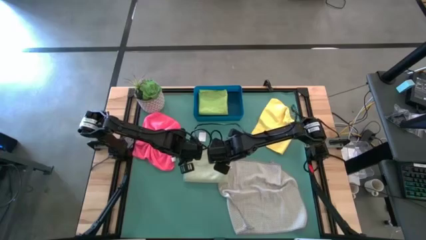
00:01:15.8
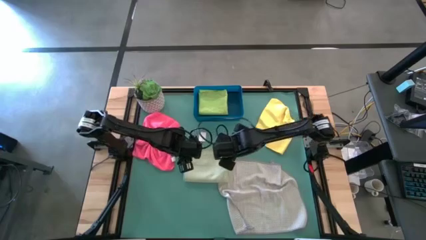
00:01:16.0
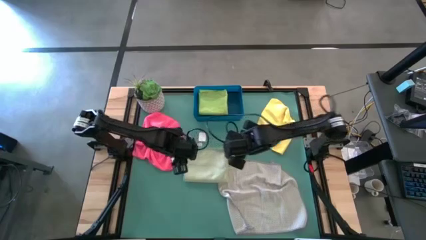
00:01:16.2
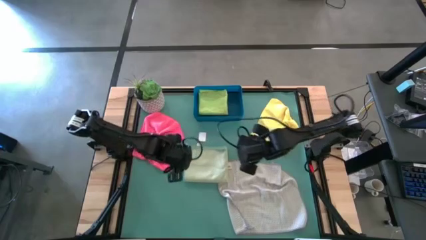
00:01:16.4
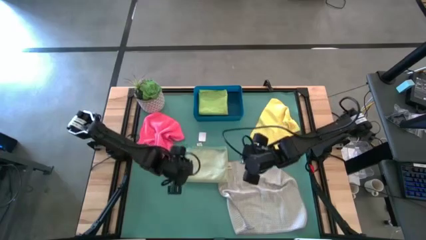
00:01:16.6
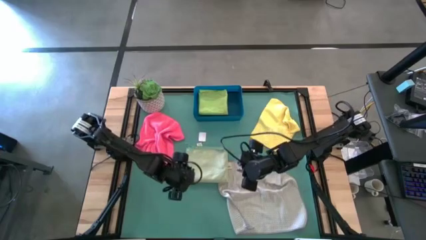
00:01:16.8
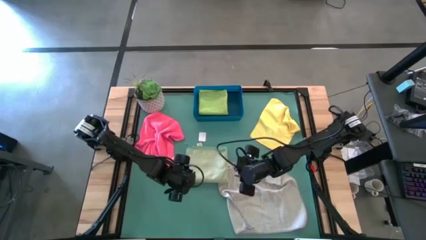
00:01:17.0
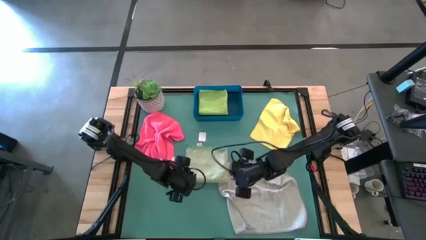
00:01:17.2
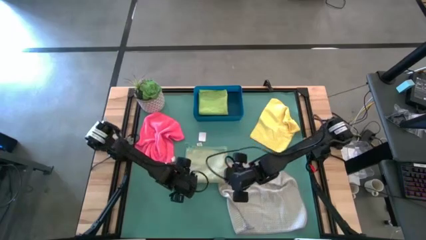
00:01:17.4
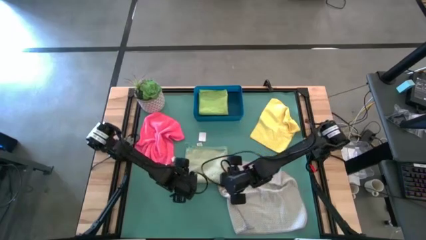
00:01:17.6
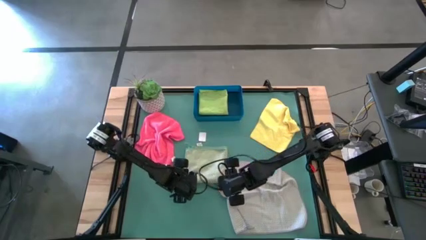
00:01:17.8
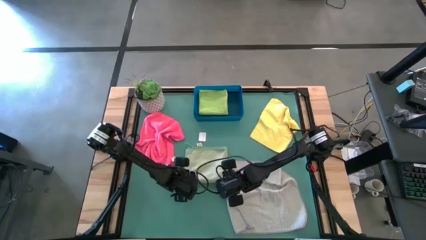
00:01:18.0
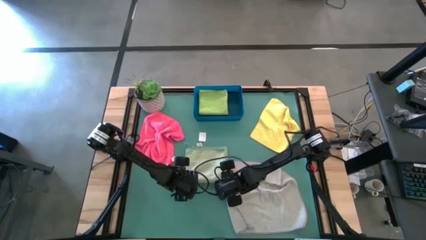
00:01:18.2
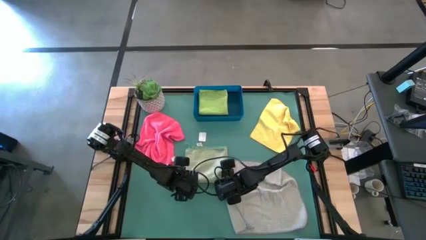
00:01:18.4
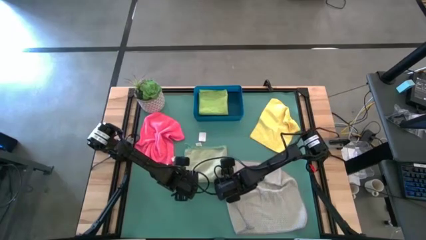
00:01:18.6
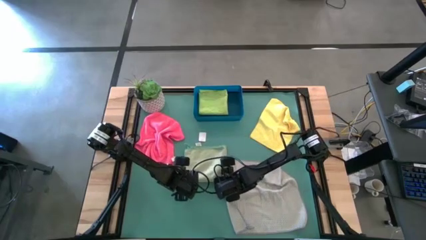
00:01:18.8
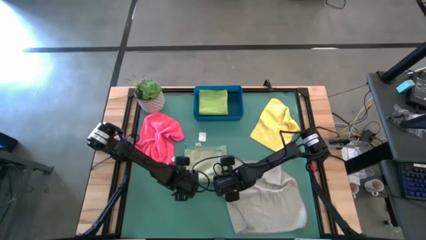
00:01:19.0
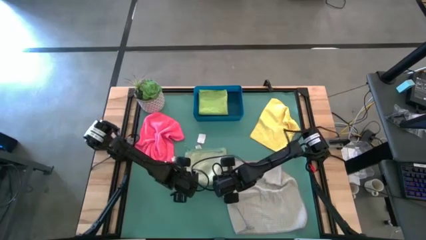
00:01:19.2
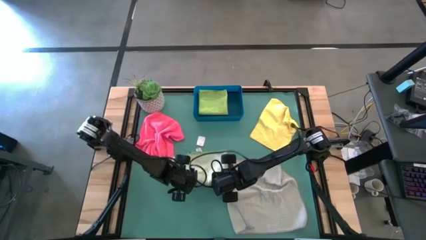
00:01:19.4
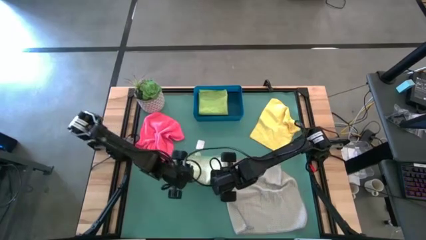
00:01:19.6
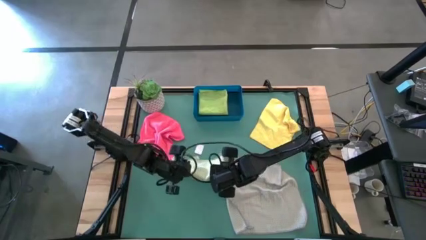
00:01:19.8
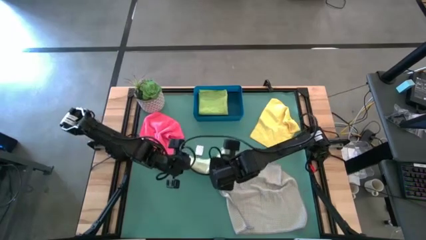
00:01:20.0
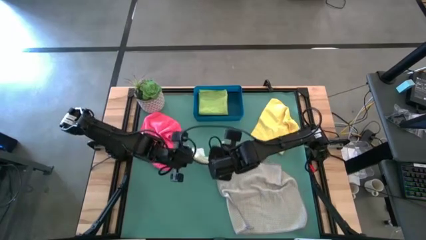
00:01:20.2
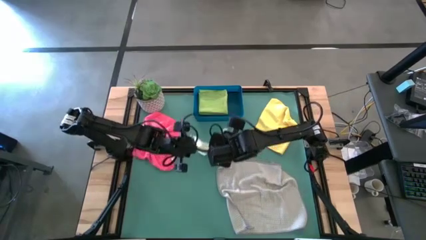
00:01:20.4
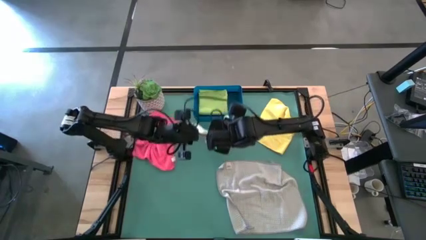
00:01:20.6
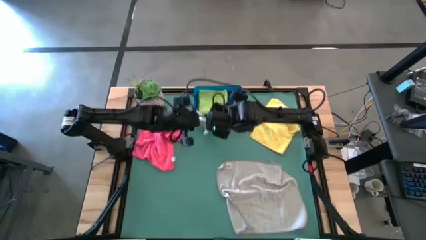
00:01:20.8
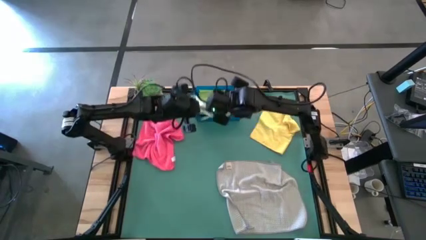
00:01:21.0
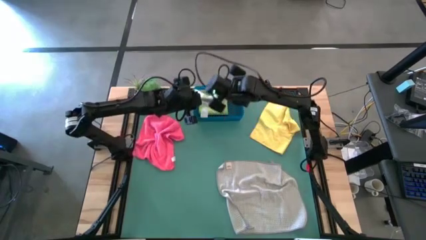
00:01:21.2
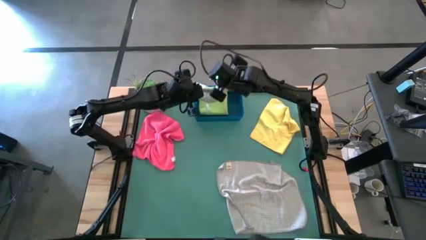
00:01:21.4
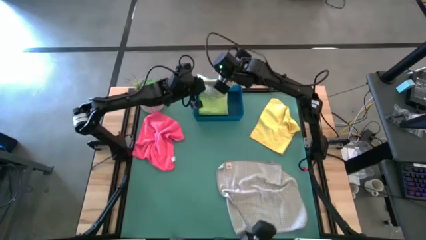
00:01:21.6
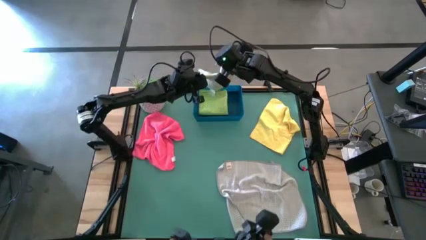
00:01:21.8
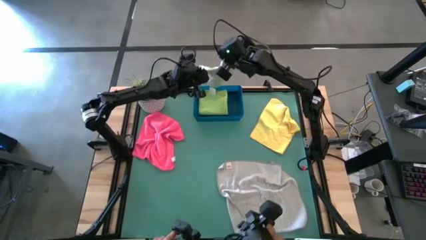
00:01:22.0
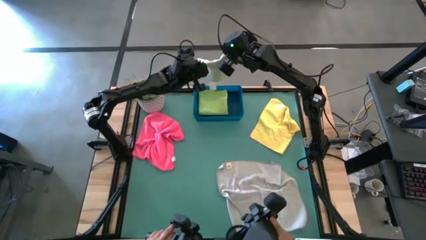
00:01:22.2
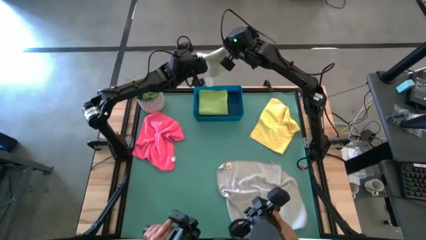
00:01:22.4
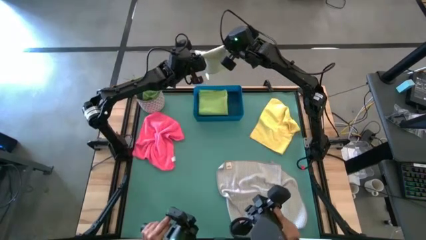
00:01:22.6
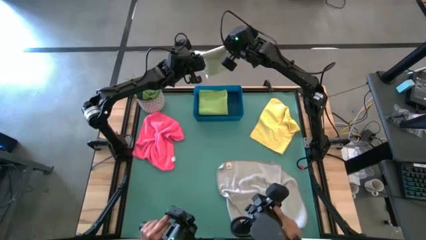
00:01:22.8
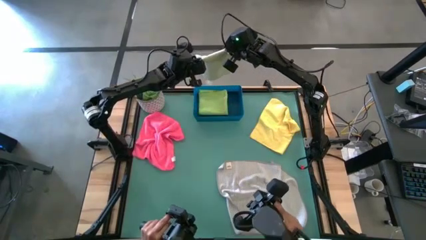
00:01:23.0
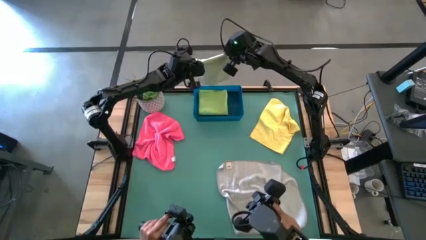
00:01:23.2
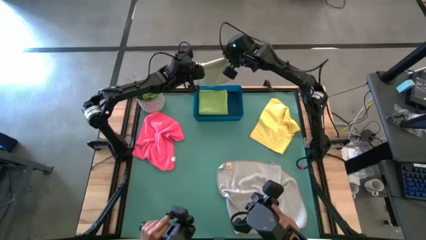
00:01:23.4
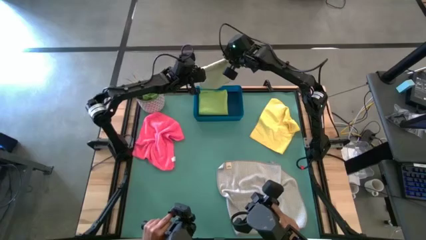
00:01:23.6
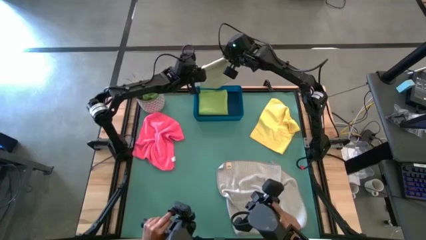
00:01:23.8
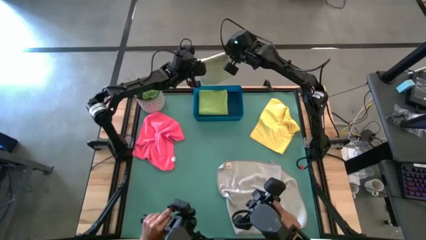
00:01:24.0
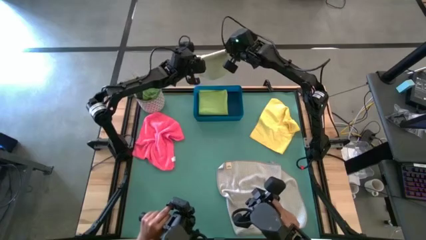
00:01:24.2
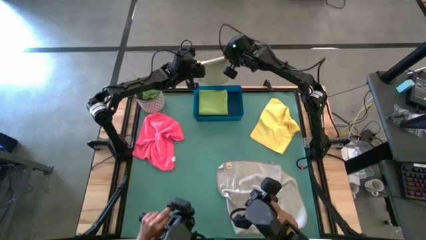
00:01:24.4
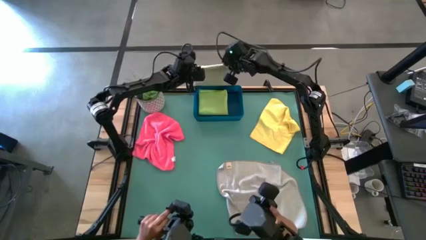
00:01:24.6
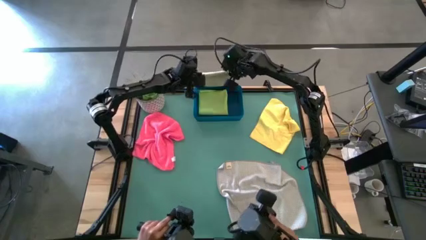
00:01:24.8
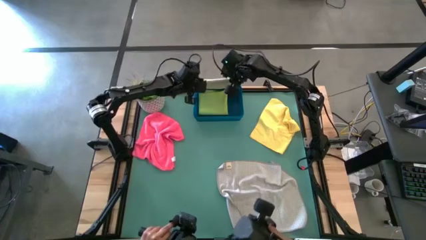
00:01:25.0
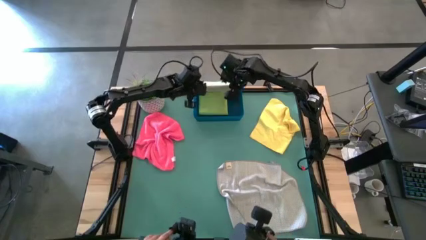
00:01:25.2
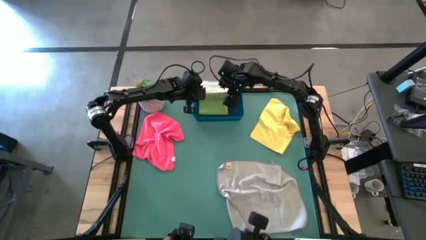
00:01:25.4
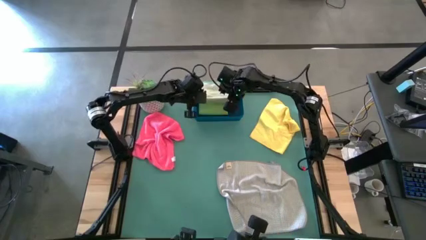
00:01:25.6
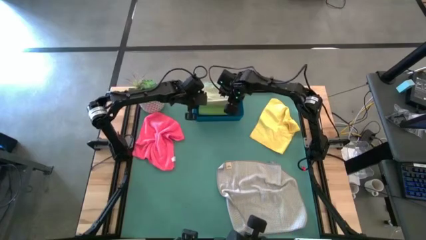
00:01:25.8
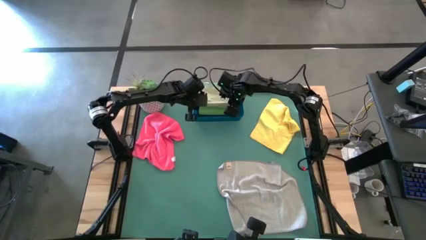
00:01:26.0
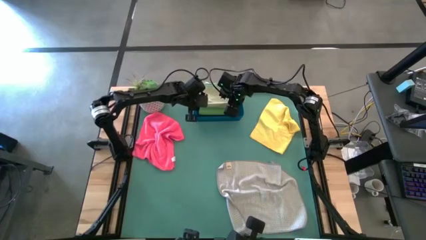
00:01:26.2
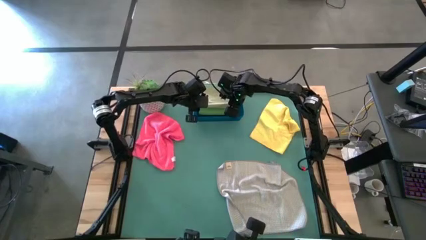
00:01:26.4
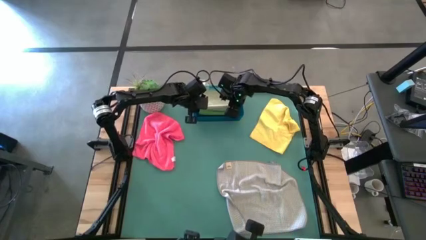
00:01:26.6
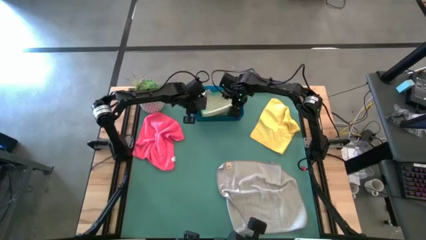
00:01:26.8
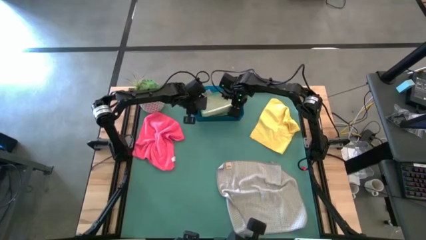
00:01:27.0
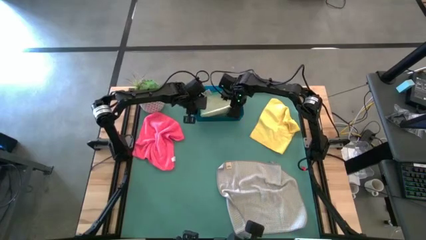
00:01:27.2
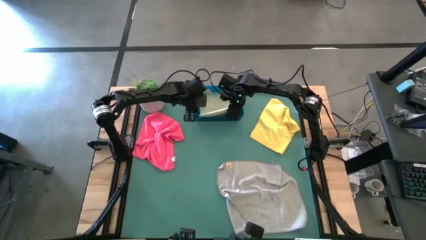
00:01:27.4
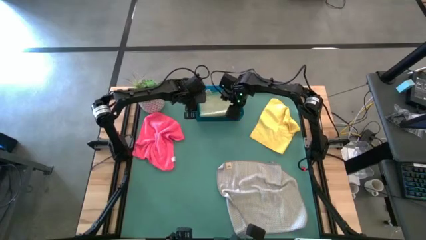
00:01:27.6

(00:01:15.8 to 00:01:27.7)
Task: Fold microfiber towels
Put the folded light green microfiber towel into the blue bin

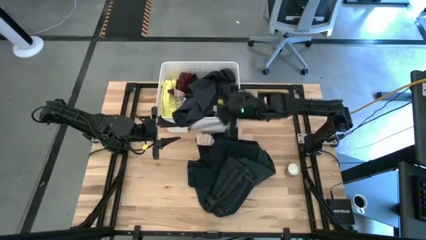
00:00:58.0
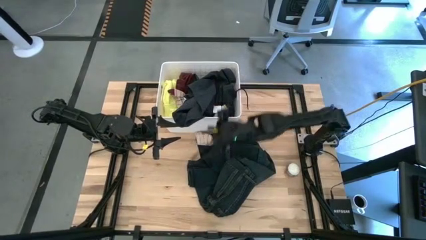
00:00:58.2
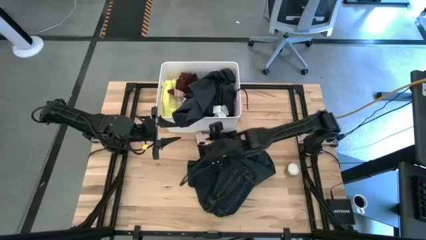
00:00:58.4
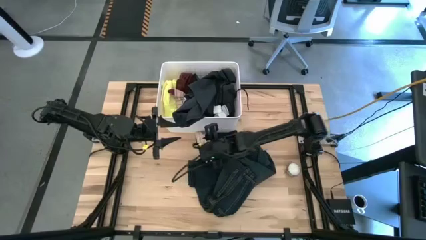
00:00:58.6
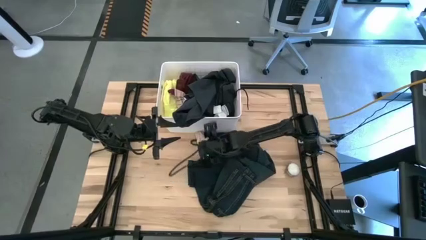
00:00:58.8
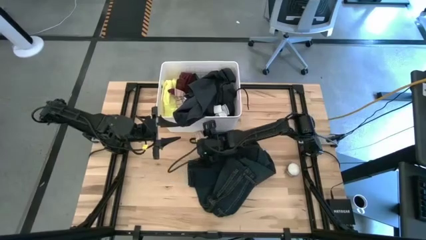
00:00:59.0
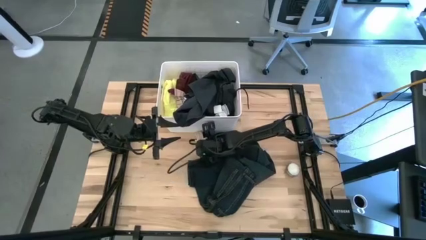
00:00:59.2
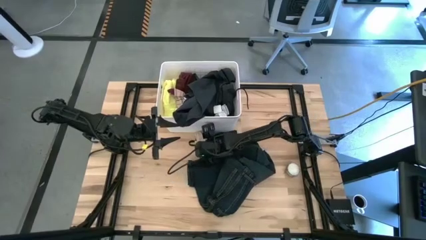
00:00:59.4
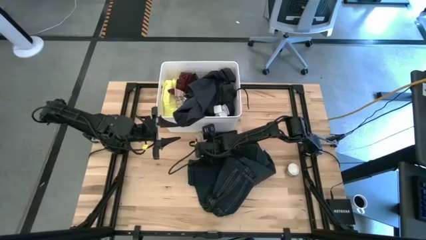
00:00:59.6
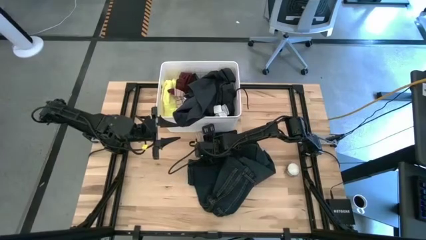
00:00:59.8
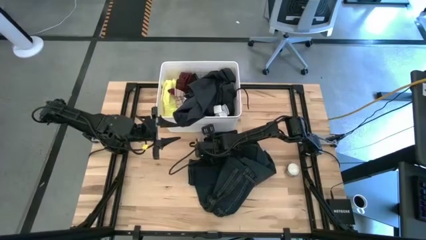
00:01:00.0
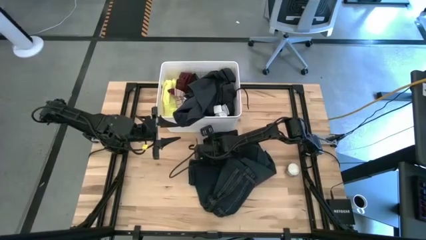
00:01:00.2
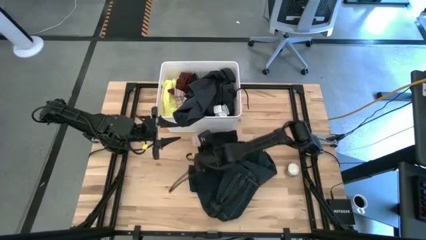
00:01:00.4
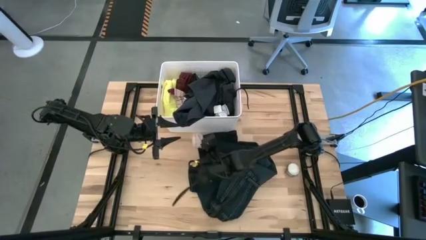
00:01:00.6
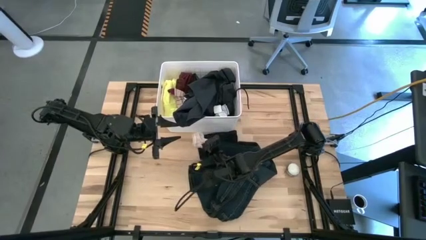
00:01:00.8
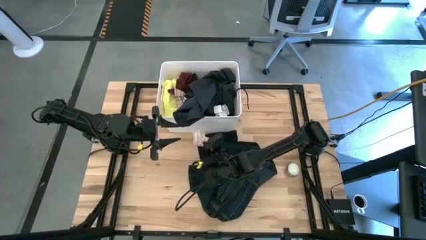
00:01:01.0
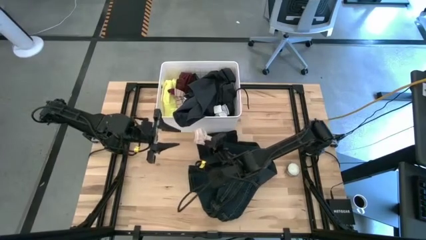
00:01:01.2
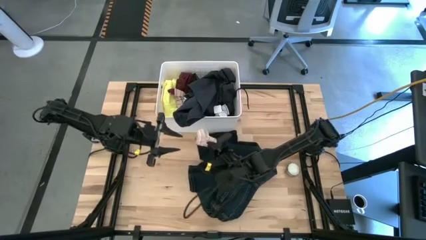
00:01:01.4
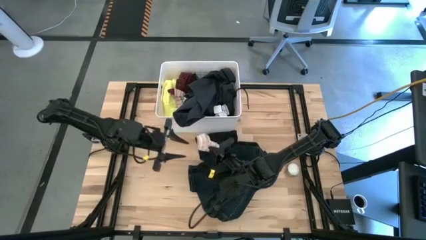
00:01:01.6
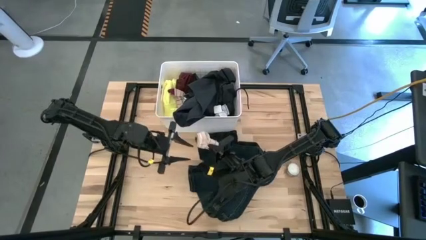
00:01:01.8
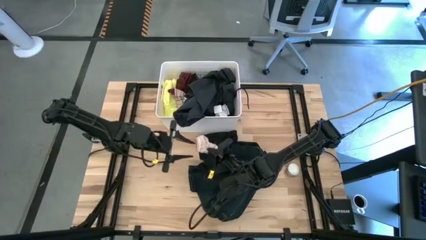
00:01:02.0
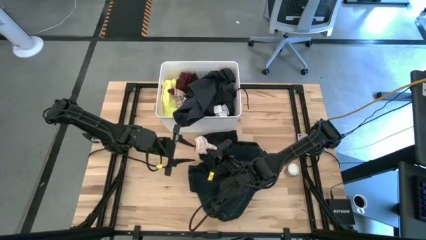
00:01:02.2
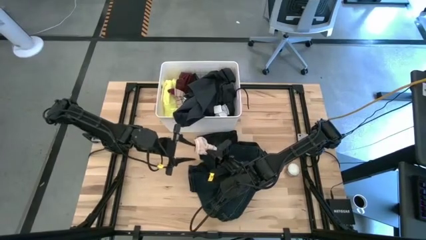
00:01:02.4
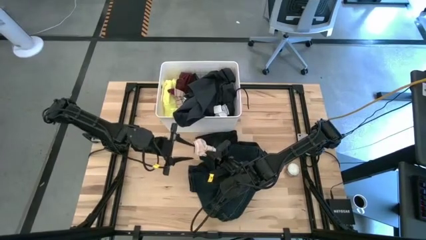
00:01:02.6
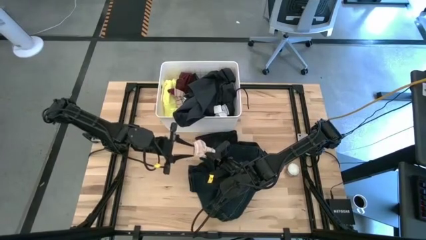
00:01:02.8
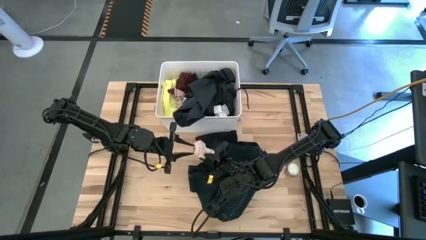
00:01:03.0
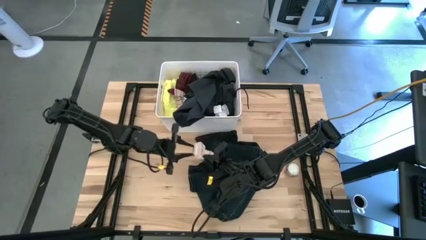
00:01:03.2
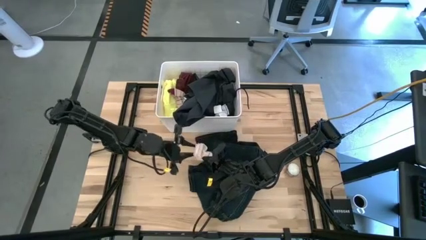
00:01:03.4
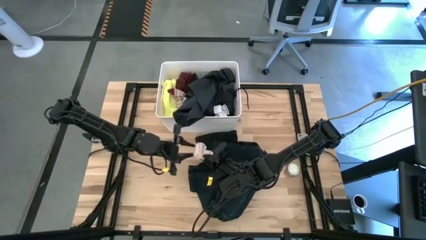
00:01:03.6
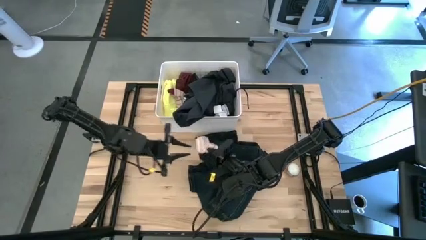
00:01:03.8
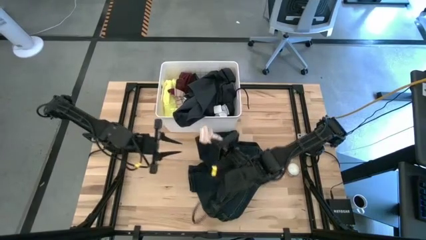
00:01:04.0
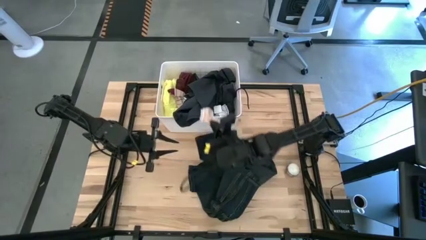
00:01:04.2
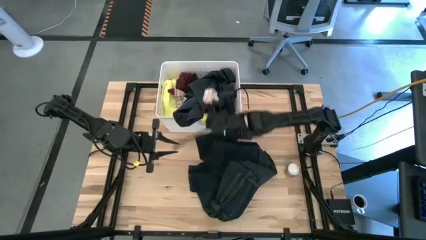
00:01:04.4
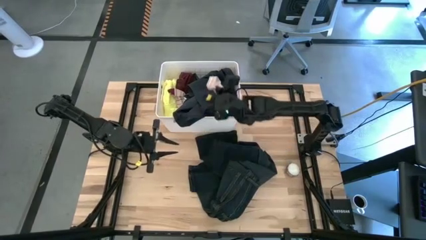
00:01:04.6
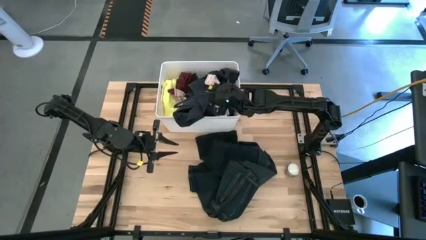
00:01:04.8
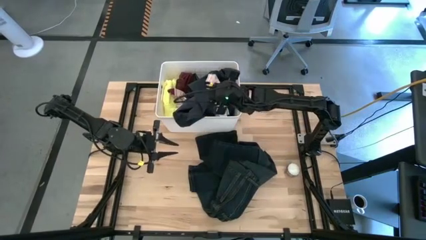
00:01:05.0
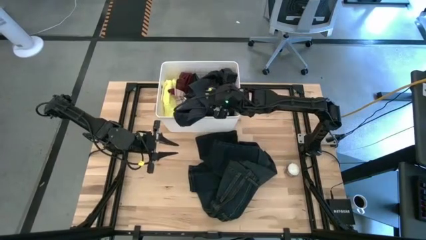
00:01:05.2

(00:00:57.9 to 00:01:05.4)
Task: Sort clothes
Put the beige sock into the white laundry organizer
